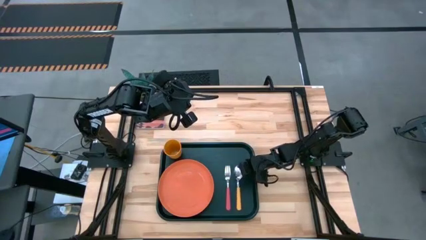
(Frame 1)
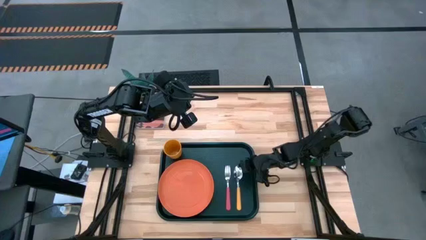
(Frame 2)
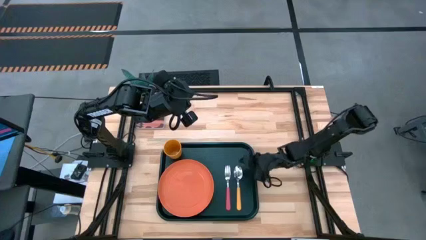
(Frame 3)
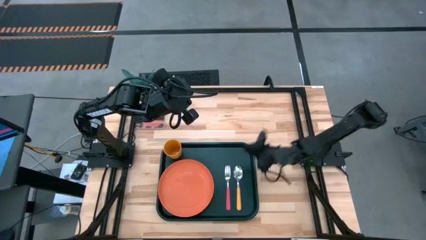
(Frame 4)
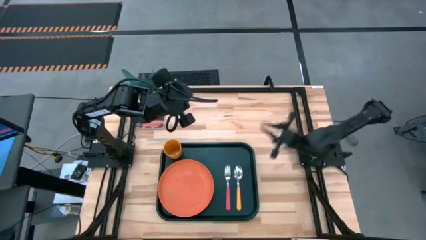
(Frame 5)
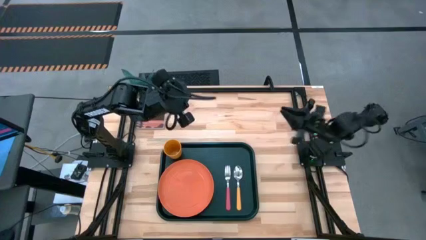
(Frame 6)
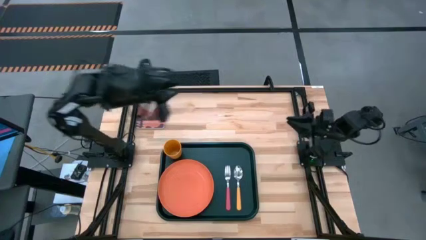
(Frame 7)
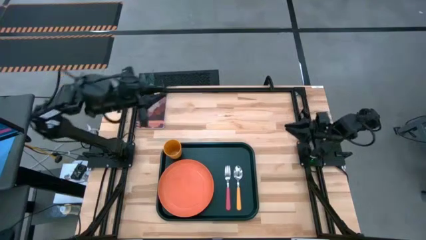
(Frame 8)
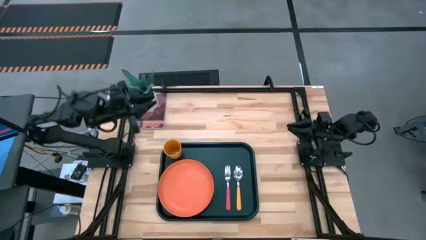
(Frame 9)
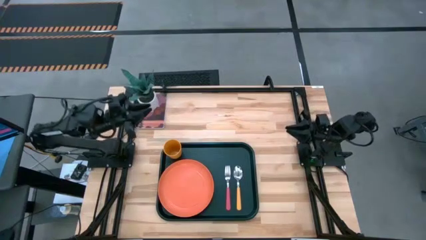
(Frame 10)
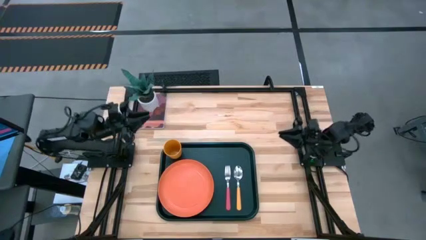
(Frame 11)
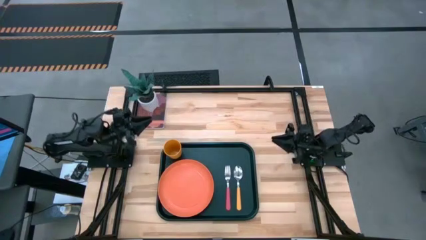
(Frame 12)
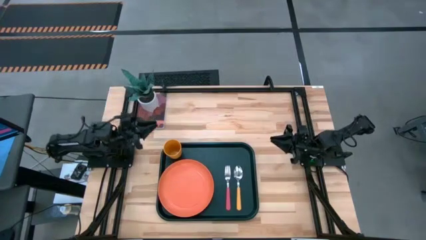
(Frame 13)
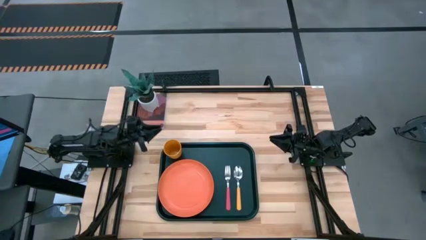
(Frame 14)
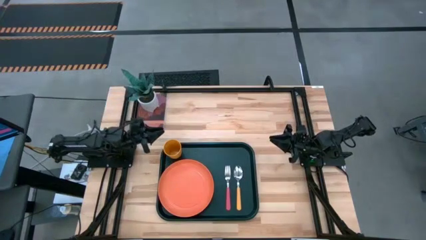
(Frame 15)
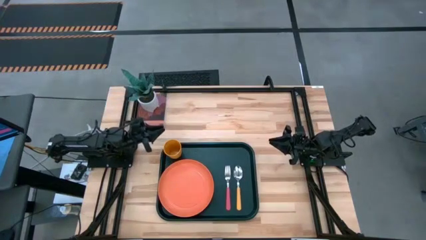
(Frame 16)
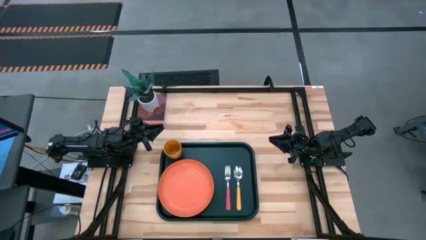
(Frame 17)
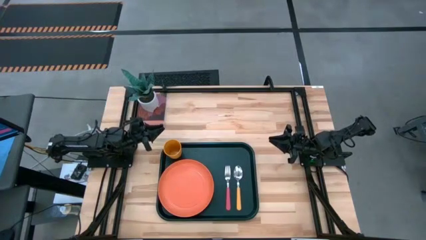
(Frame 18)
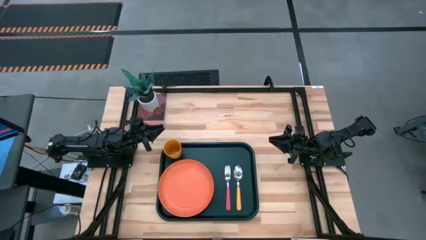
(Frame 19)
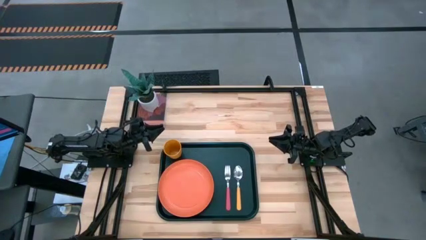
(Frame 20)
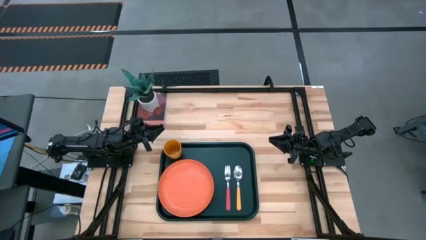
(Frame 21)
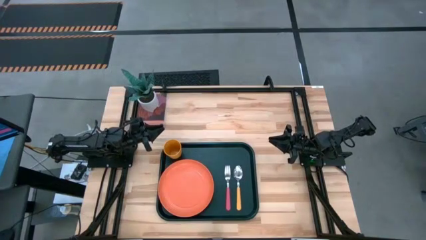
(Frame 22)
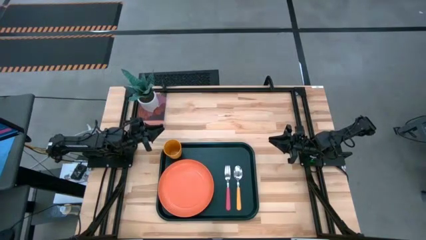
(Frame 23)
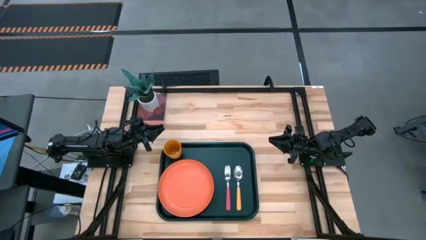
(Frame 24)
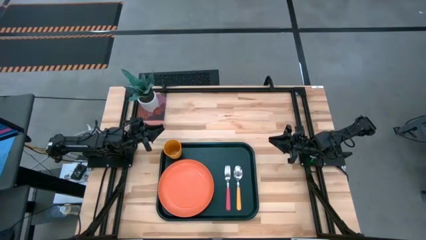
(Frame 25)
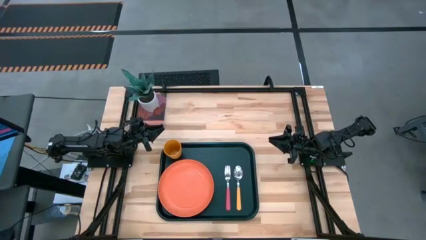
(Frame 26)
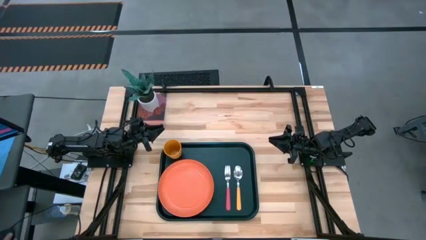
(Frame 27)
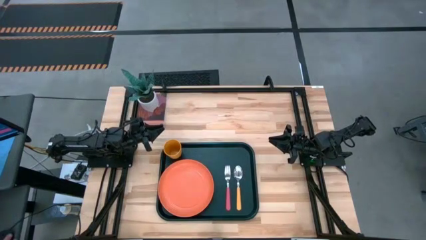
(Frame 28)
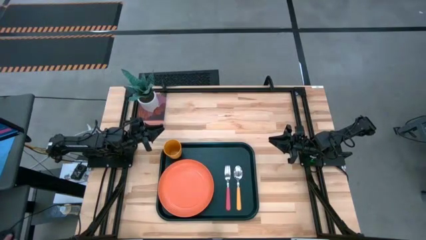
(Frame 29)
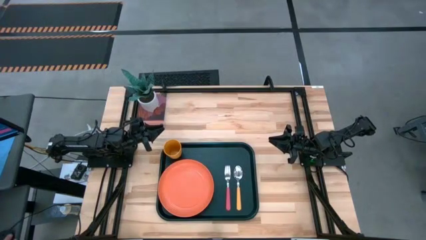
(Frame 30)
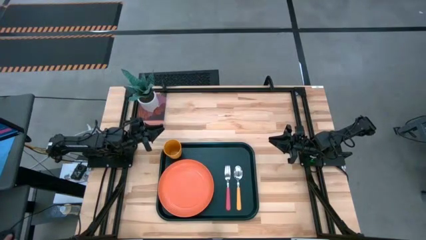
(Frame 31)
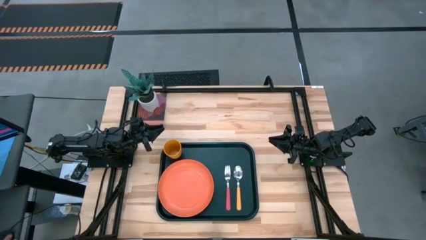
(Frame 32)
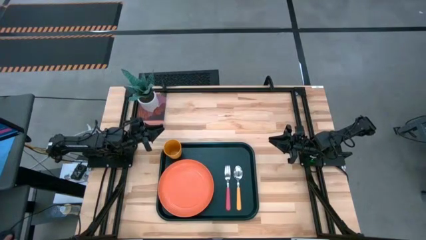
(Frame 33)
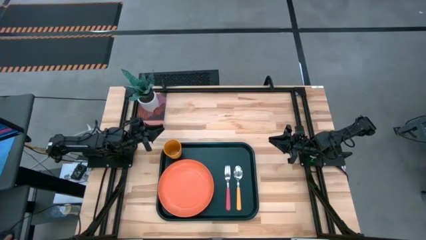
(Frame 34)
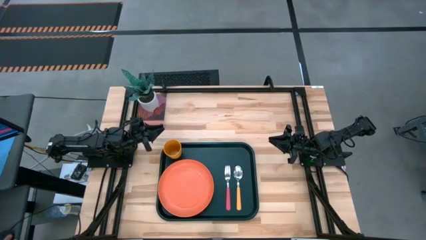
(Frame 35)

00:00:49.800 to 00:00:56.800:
Task: Pick and place plate/cup/fork/spoon on tray
Return to Home Position
